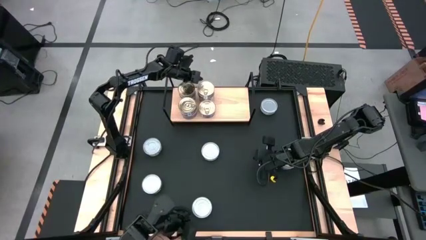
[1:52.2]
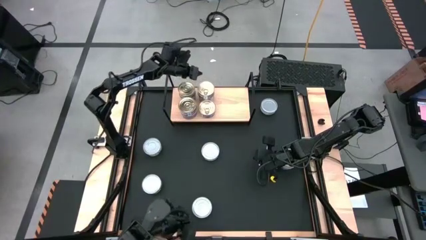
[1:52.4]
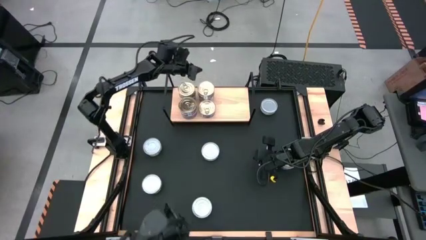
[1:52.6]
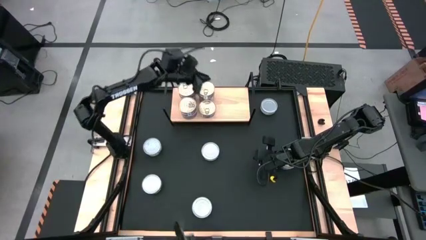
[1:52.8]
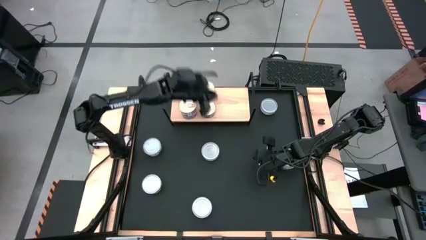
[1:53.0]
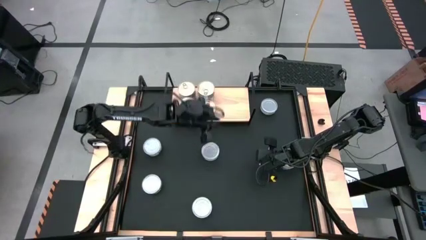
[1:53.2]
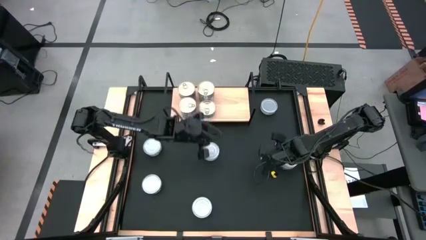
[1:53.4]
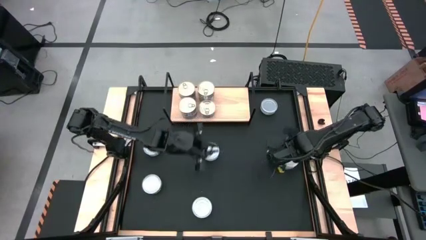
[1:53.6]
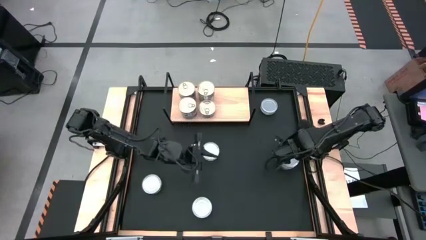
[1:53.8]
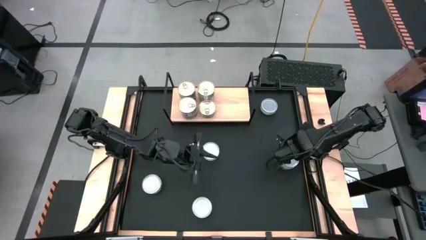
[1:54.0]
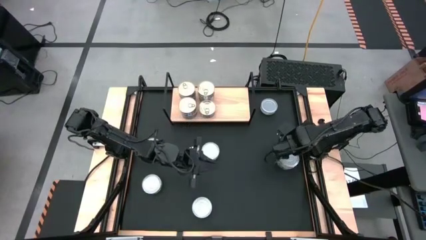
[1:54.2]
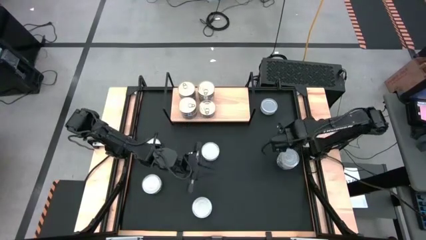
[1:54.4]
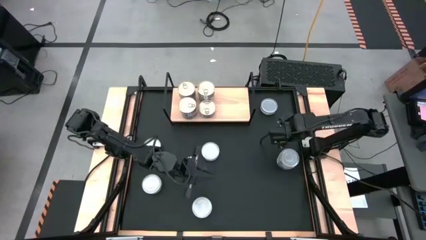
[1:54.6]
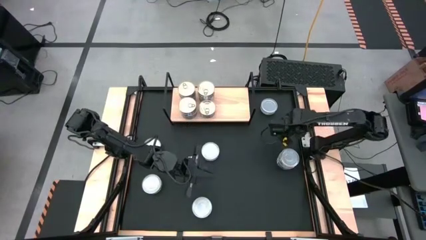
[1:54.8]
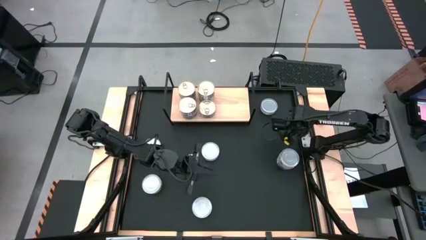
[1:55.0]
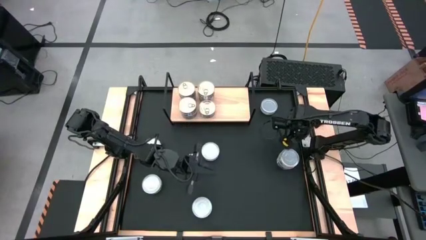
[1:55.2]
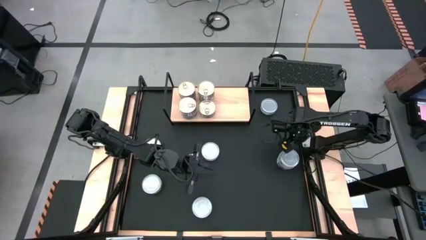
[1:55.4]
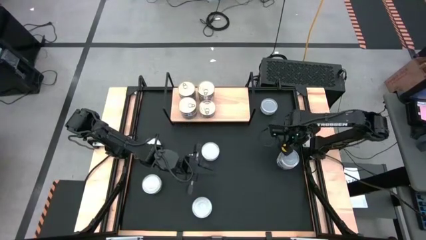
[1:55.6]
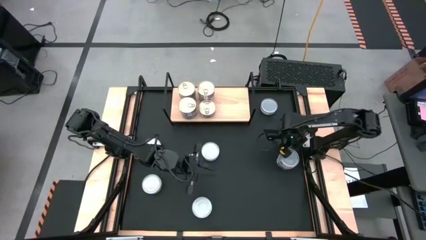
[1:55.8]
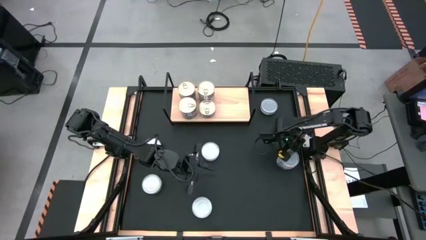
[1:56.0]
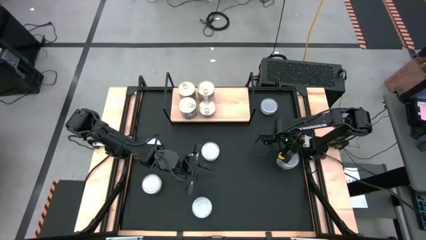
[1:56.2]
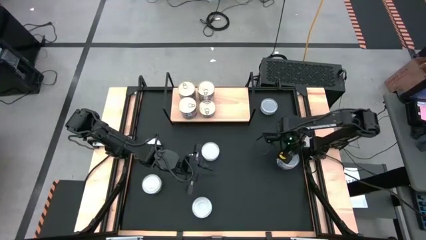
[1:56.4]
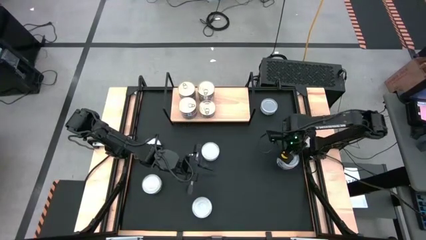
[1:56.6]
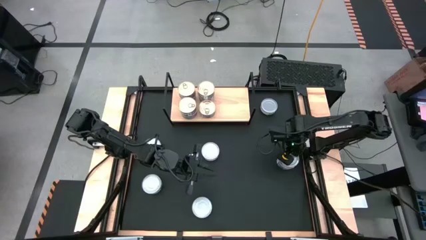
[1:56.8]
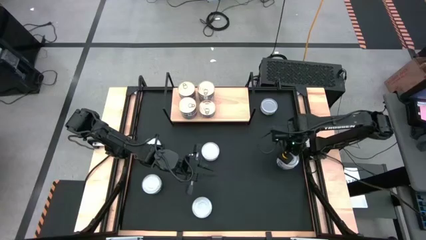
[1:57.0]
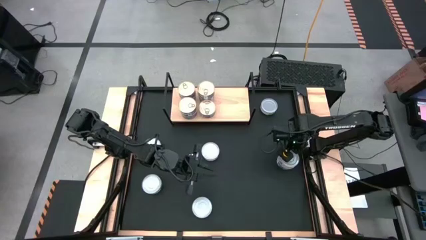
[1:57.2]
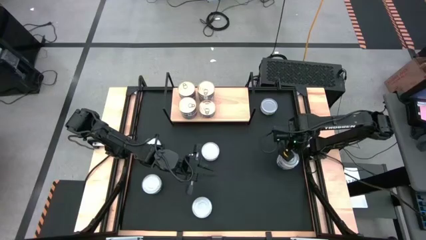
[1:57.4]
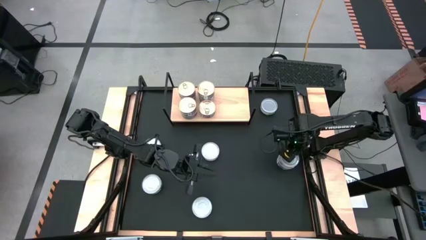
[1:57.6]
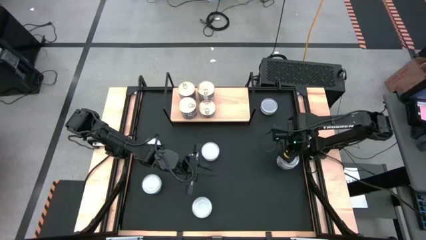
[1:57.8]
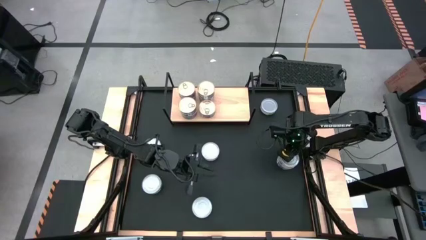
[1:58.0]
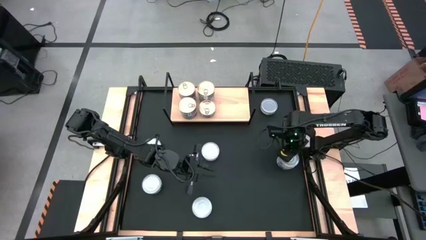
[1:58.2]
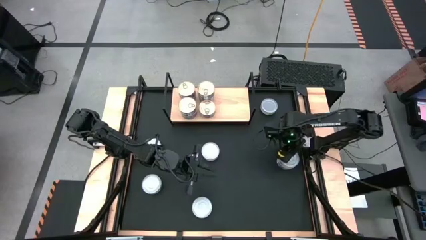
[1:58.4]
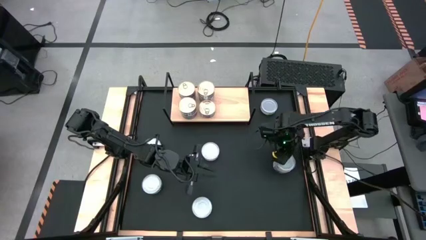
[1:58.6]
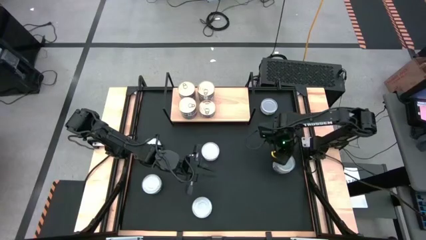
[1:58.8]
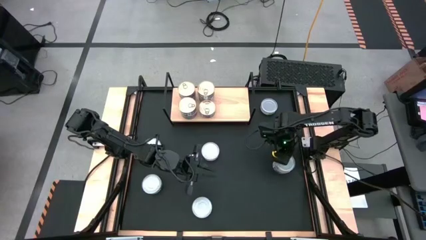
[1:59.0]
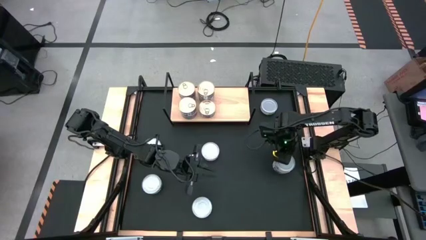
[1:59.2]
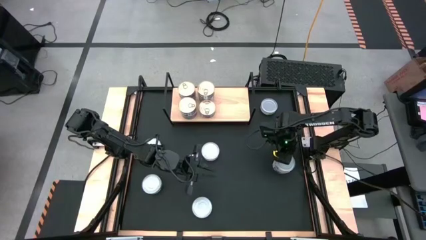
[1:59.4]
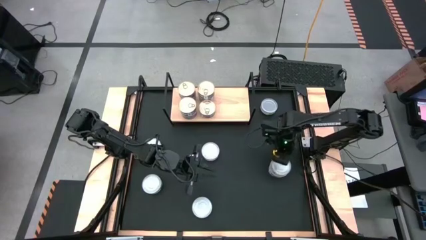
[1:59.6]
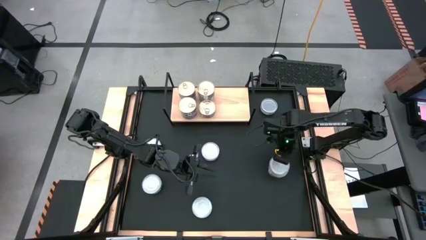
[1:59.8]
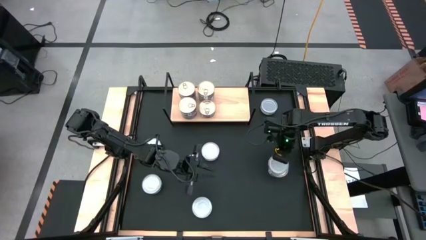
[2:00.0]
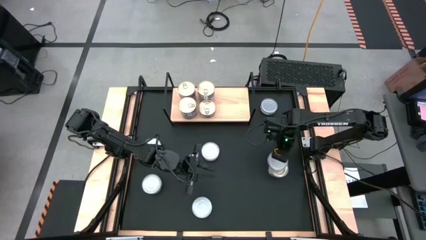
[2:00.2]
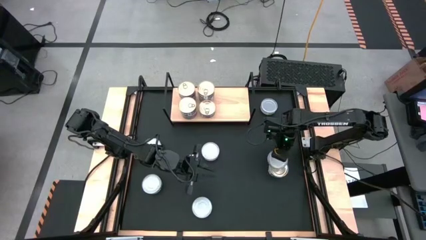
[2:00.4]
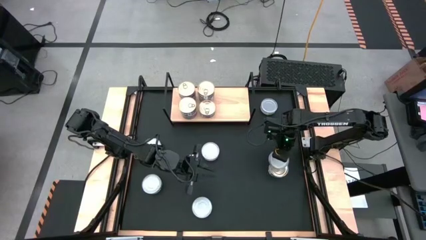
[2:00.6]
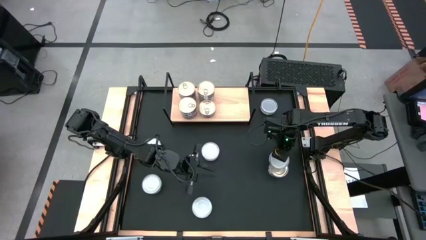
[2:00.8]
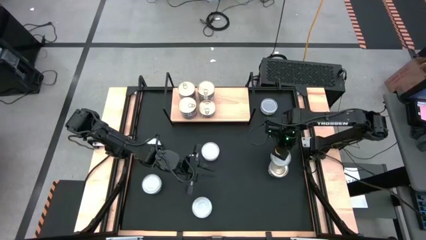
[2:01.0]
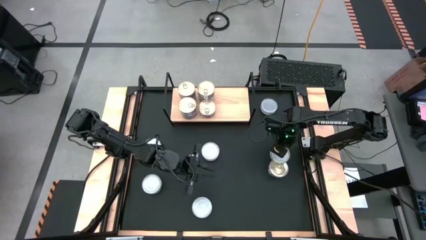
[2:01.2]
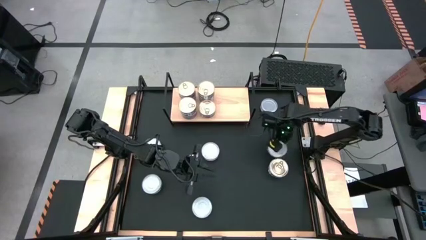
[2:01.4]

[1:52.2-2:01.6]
Task: Stack canned seafood by type on shelf
Remove the green tuna can from the top of the blue tuna can

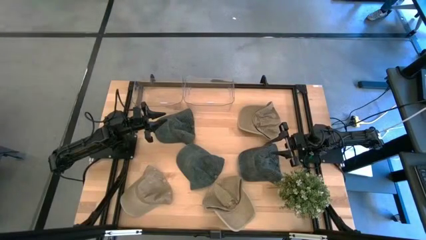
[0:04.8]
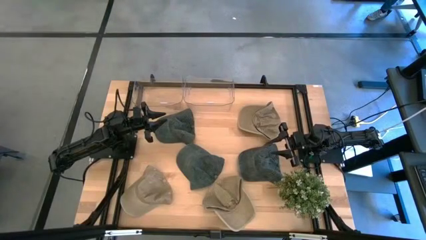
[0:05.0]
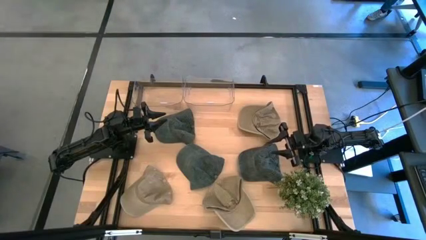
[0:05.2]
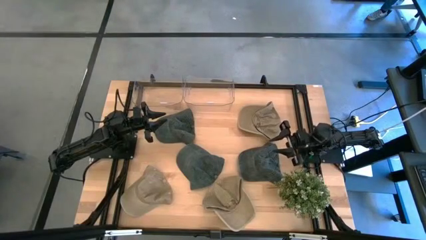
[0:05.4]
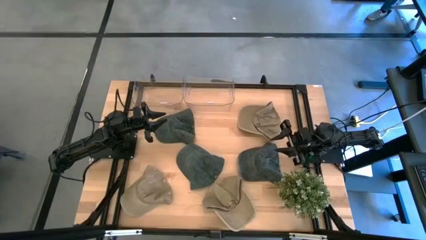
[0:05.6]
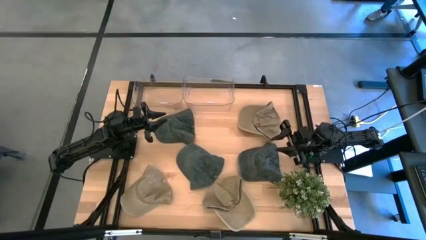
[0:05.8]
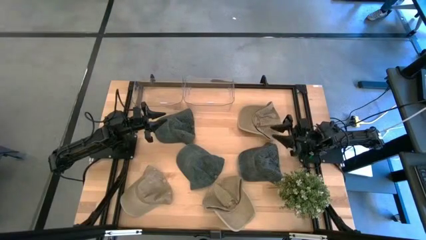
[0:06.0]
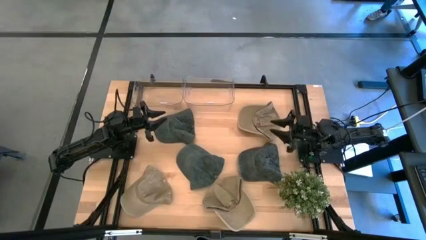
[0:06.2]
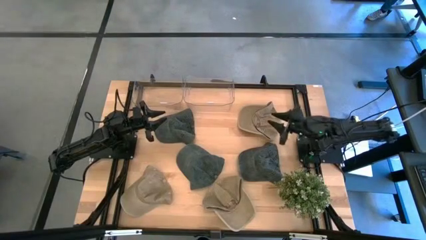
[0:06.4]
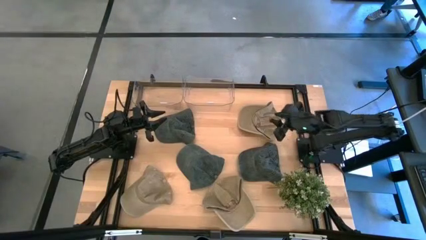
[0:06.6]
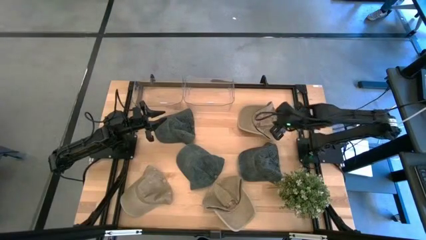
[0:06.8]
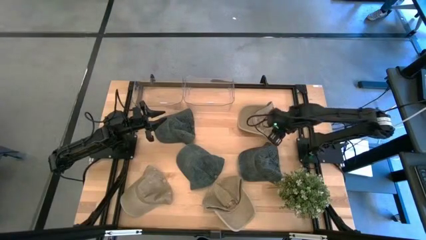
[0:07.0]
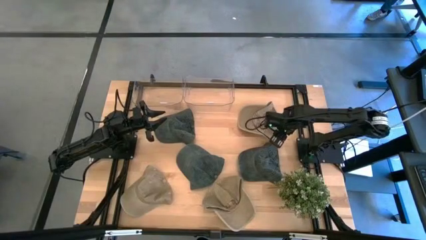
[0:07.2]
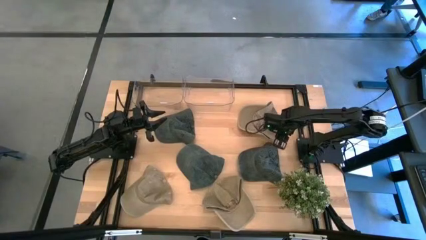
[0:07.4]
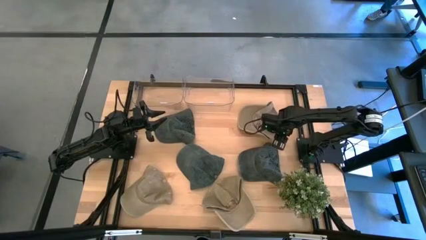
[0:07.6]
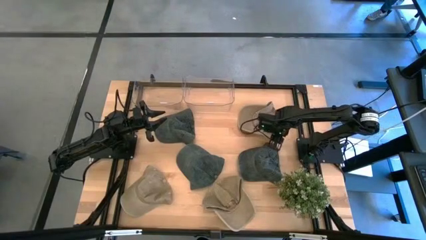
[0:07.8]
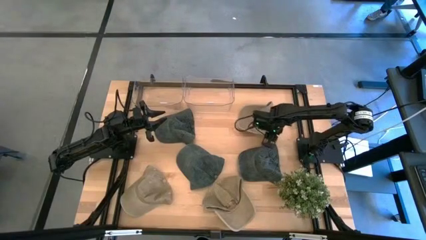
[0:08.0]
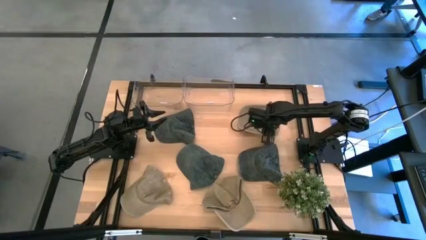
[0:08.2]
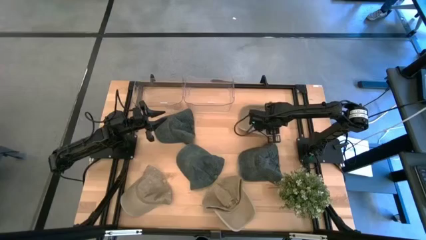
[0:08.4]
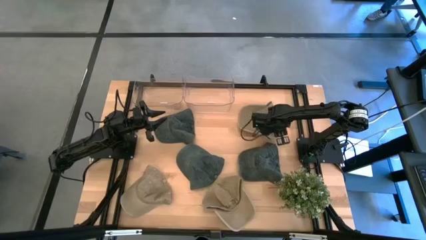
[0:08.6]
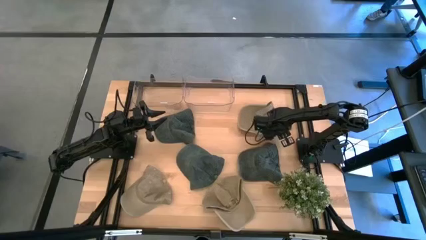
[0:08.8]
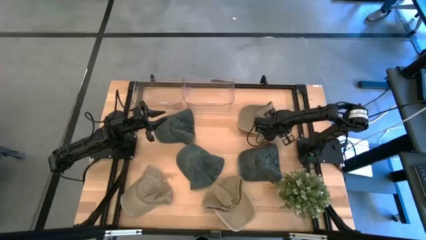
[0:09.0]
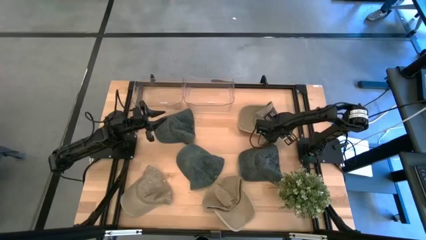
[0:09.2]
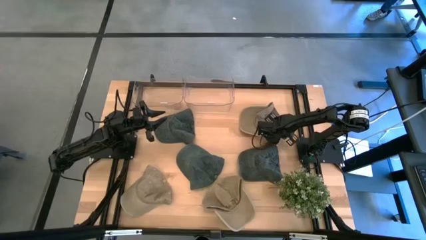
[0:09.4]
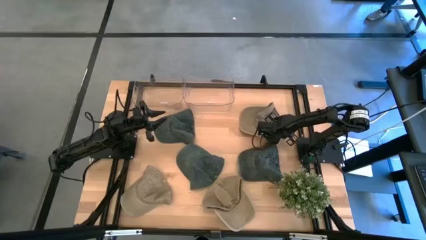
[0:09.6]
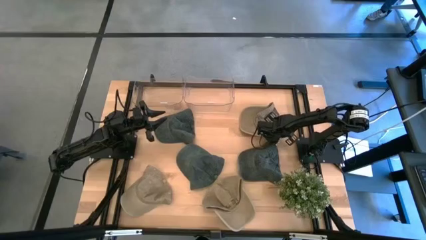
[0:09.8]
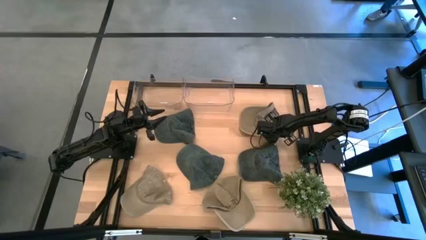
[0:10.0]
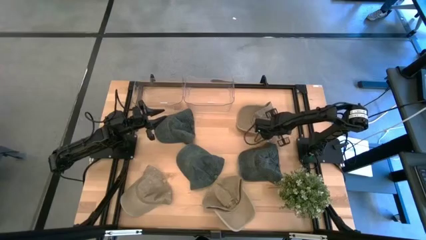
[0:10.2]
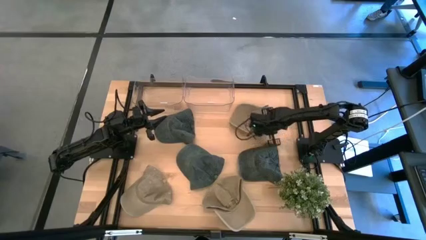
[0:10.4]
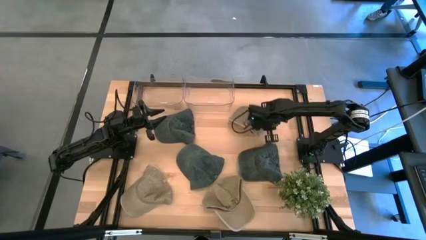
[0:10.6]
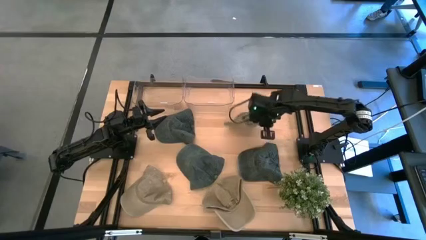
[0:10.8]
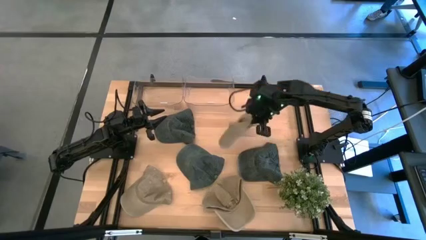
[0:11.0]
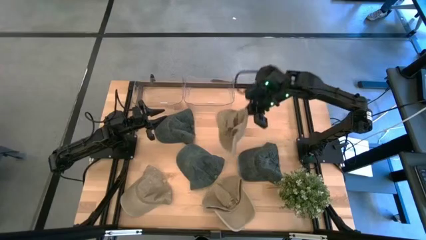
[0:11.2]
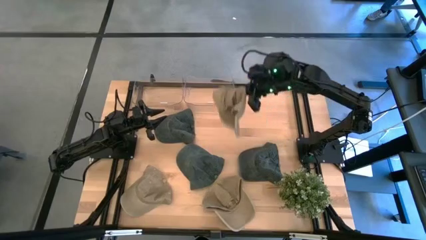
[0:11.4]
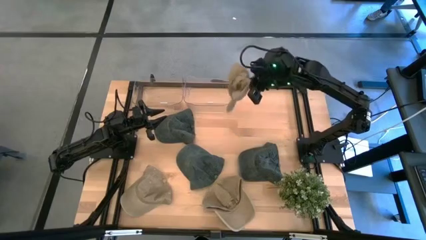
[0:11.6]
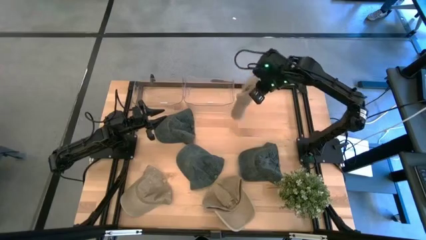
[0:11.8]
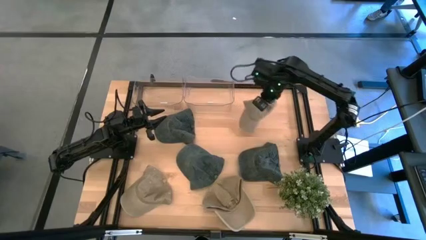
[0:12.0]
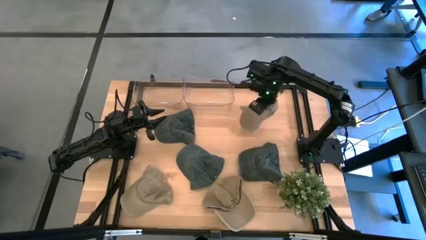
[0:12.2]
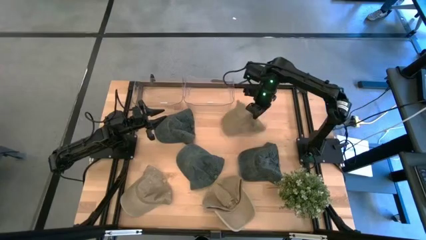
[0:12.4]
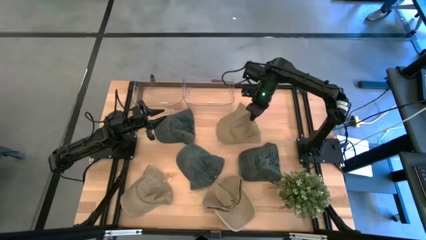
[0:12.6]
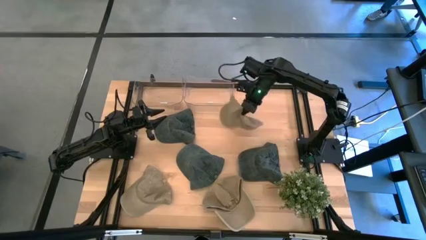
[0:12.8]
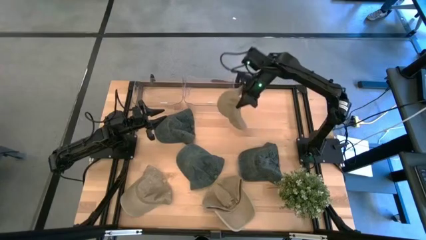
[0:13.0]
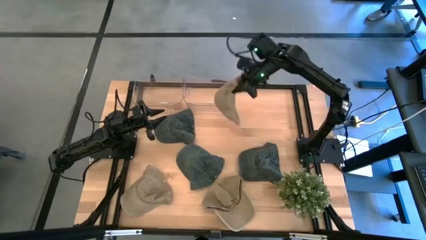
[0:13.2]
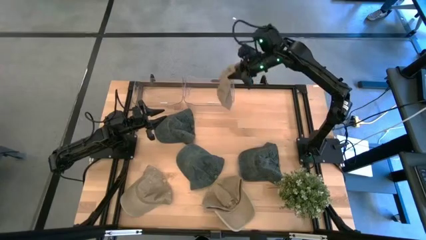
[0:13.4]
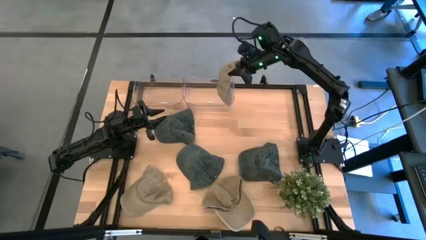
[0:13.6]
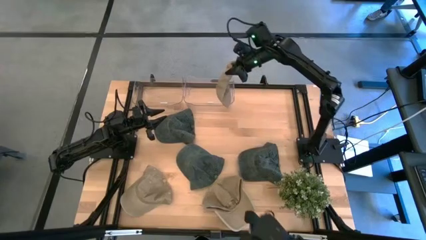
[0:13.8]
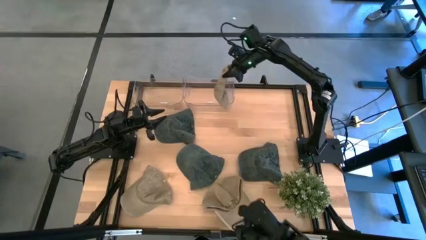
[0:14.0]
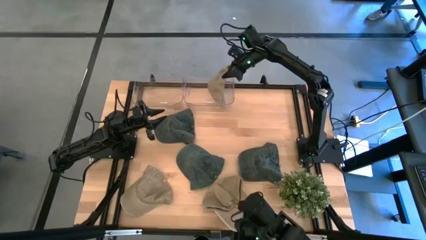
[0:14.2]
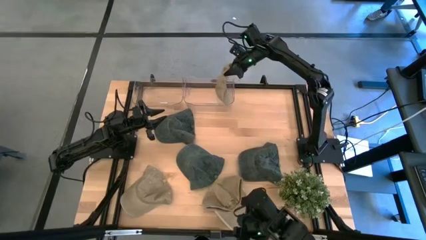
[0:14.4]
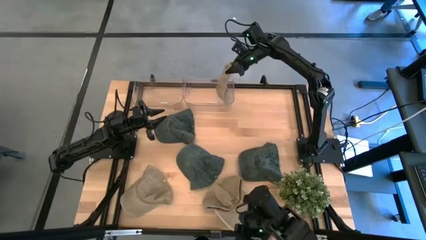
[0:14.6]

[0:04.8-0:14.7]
Task: Pick & Place hat
Put the top brown cap into the right transparent bin
